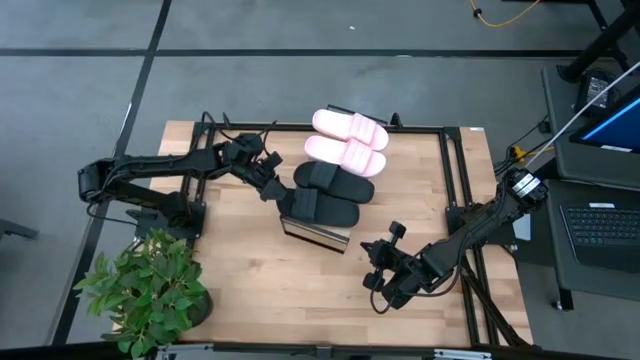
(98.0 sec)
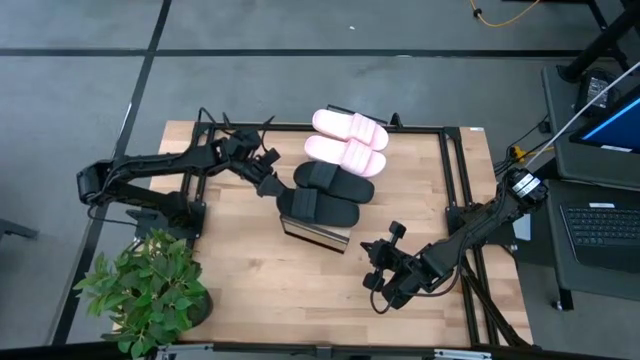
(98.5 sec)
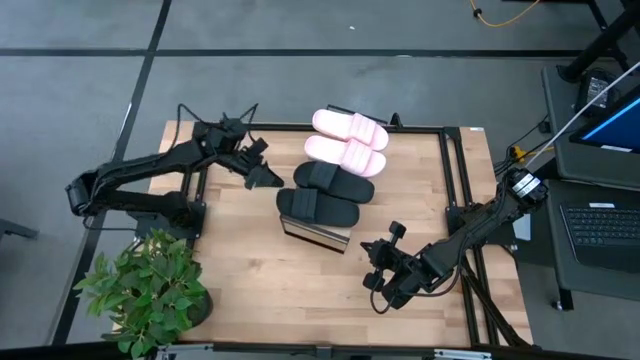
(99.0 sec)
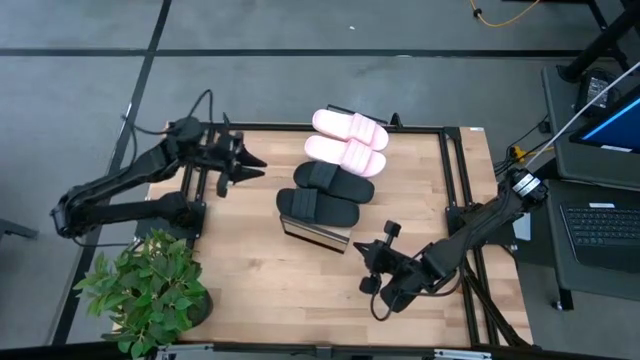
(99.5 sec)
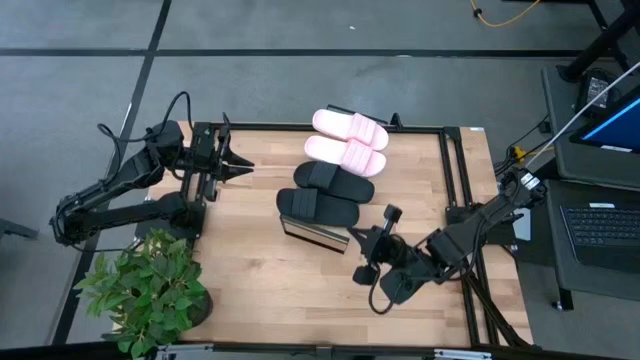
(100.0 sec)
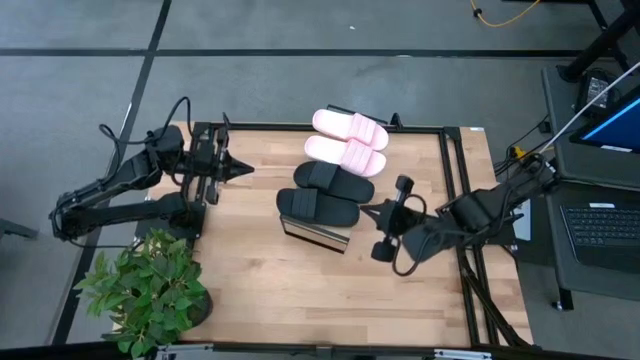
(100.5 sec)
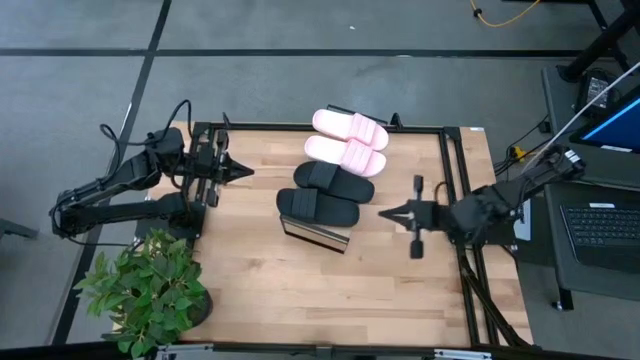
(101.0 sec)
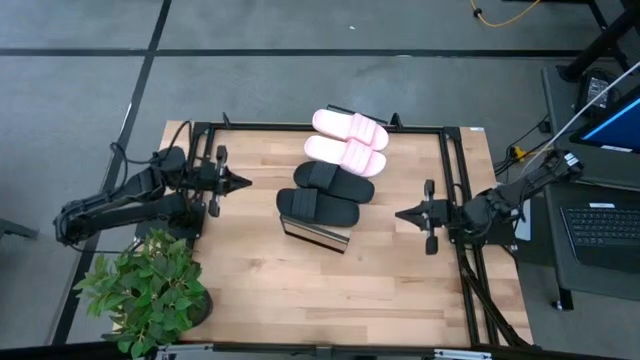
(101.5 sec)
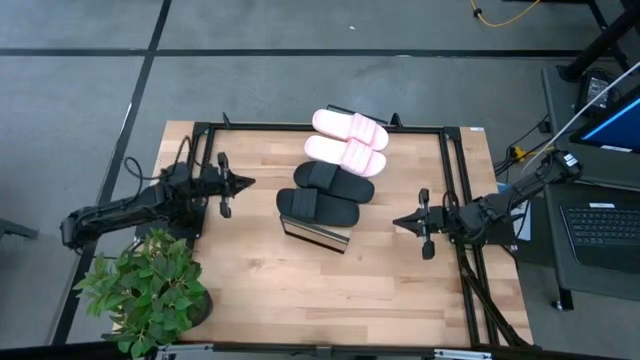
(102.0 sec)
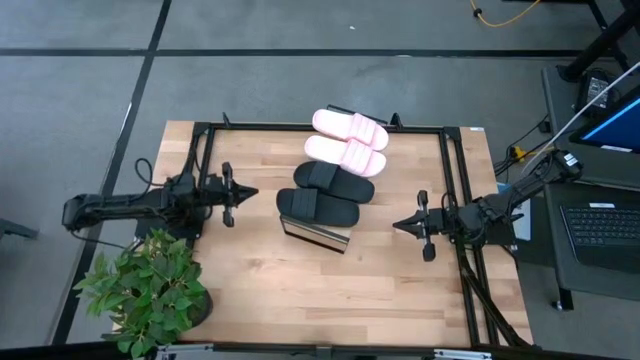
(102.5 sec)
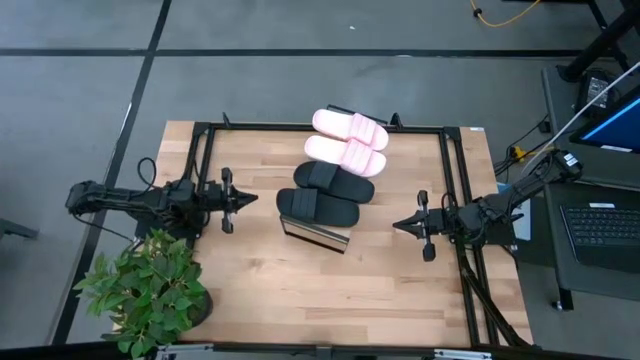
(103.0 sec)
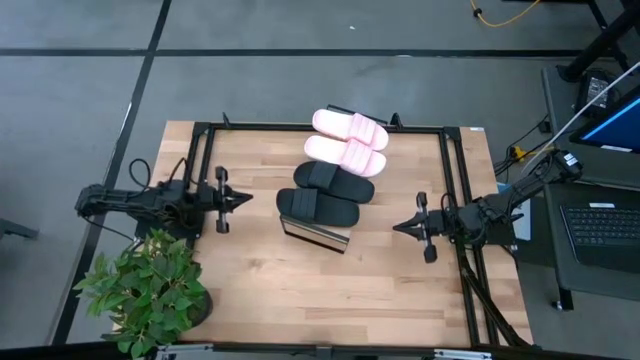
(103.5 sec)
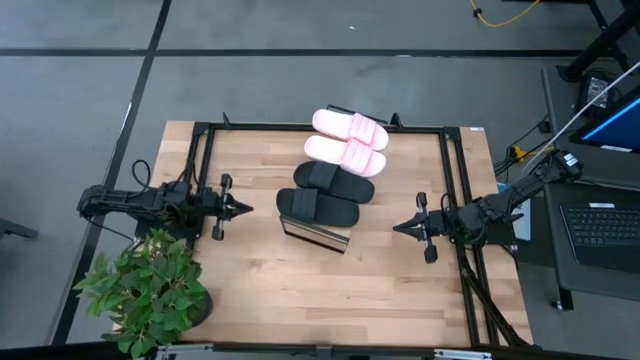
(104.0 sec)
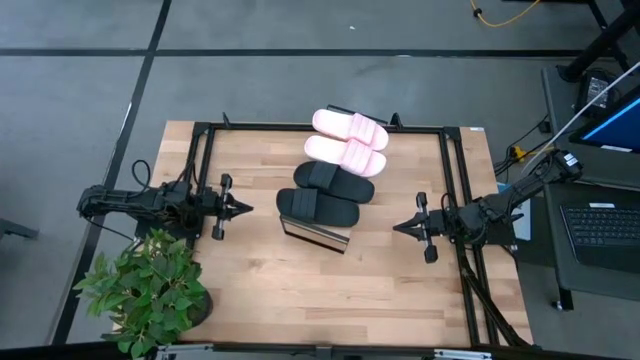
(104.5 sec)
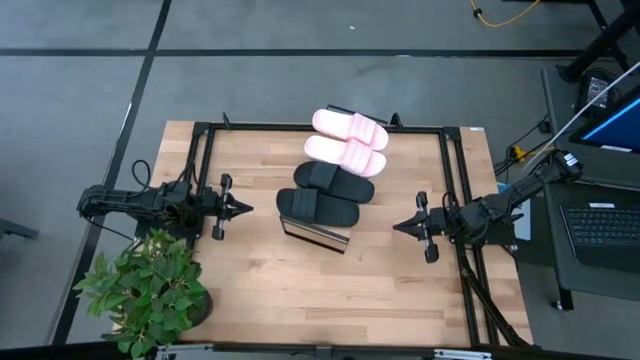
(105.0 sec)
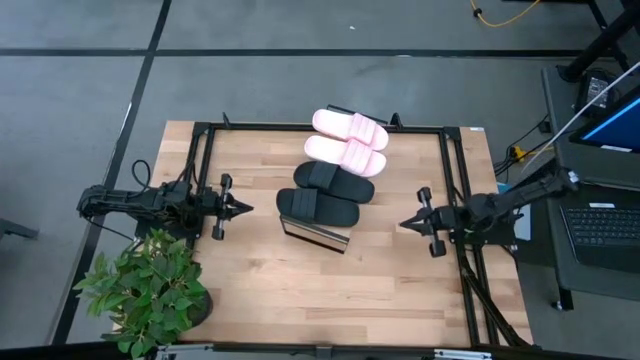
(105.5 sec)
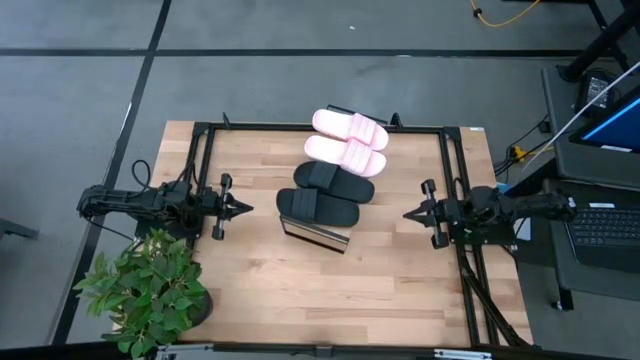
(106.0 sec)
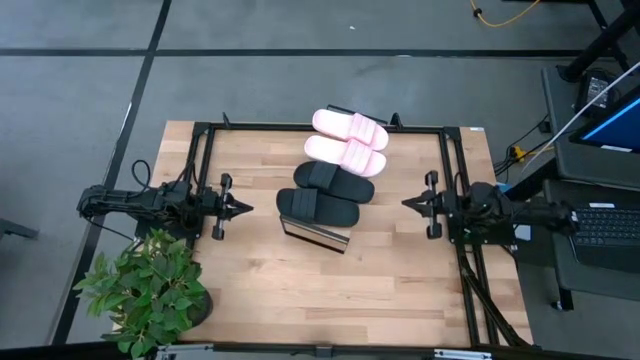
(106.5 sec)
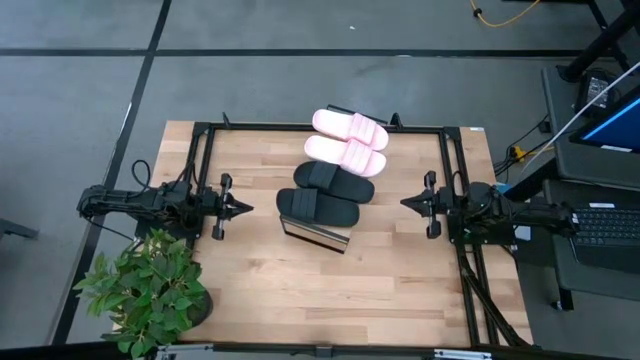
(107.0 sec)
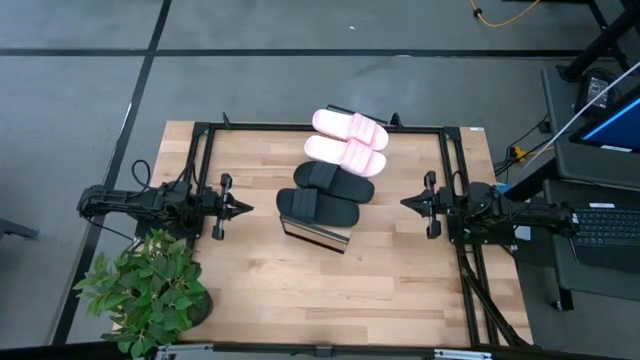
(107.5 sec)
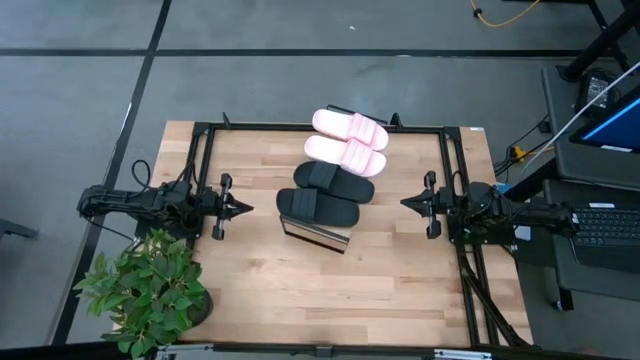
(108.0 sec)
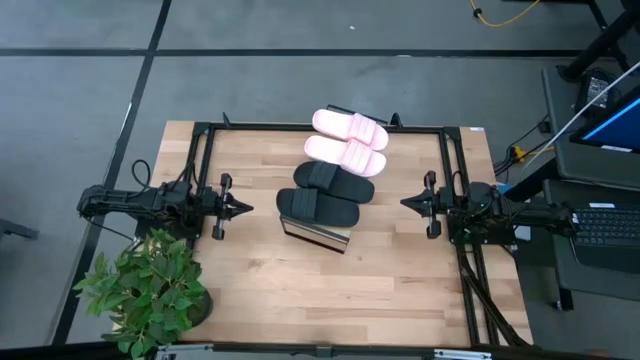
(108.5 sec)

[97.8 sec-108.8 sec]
Task: Pick and place slides into the shelf
Return to Home Position

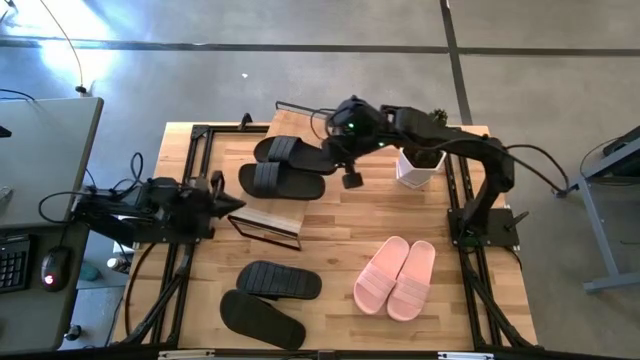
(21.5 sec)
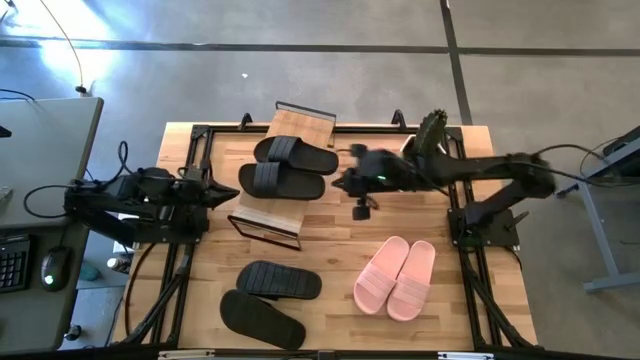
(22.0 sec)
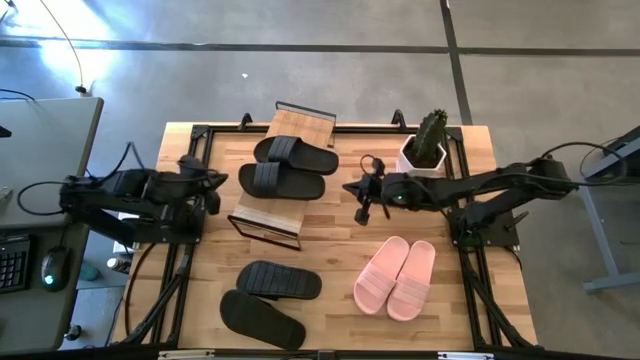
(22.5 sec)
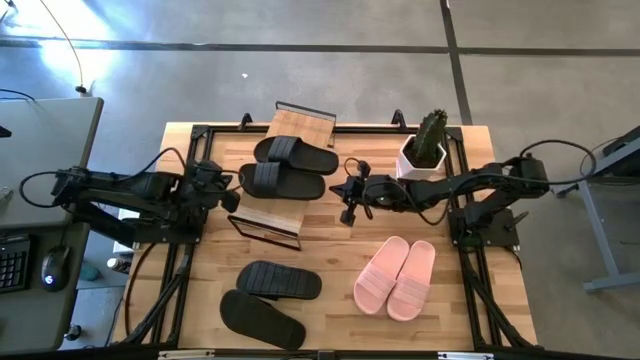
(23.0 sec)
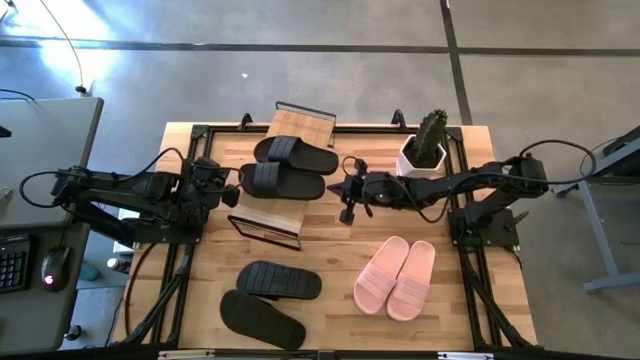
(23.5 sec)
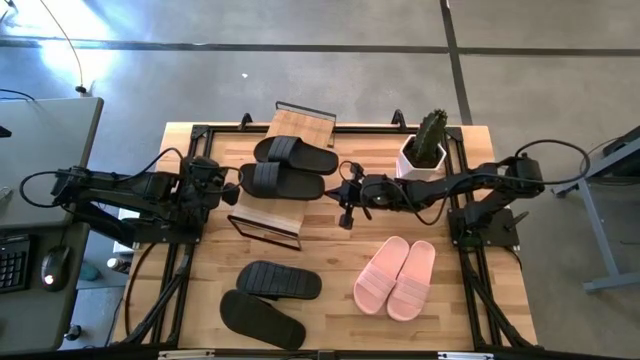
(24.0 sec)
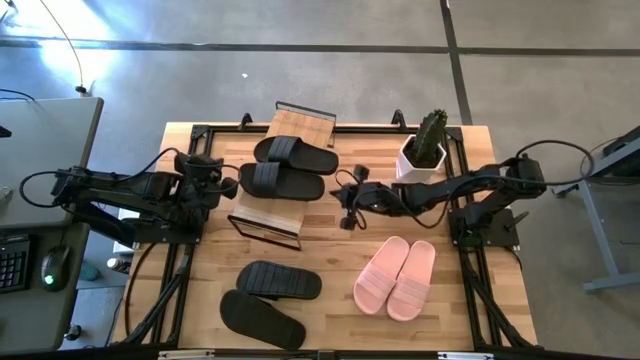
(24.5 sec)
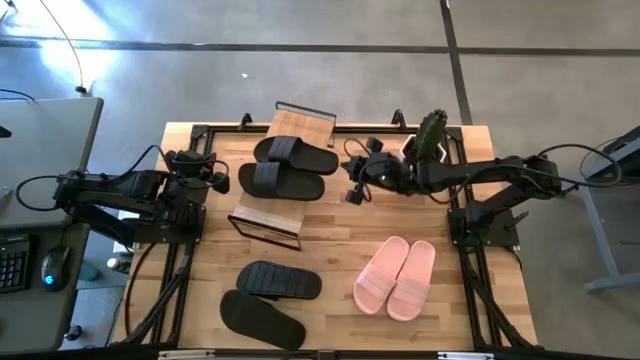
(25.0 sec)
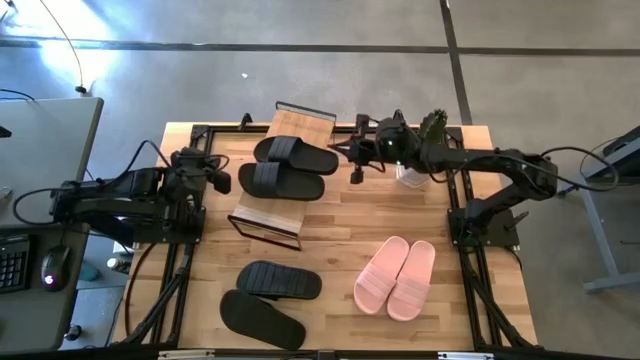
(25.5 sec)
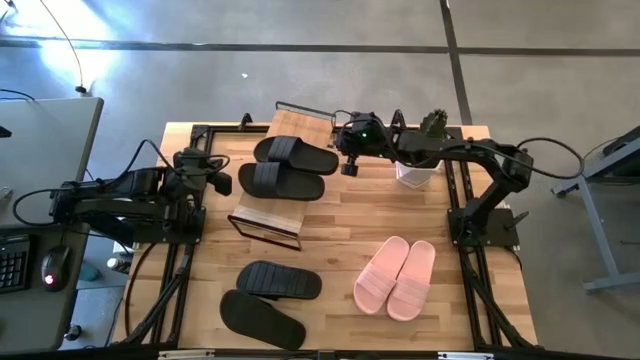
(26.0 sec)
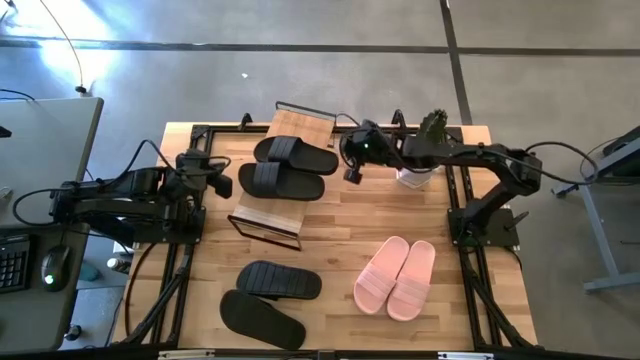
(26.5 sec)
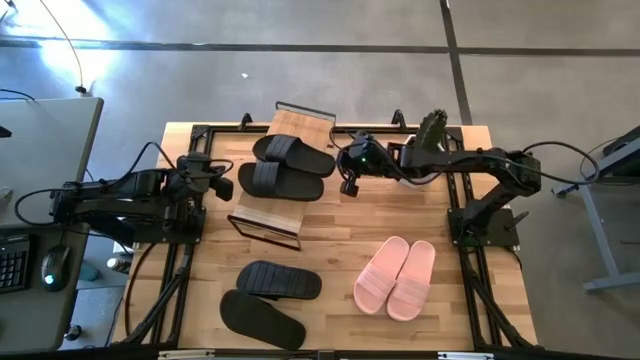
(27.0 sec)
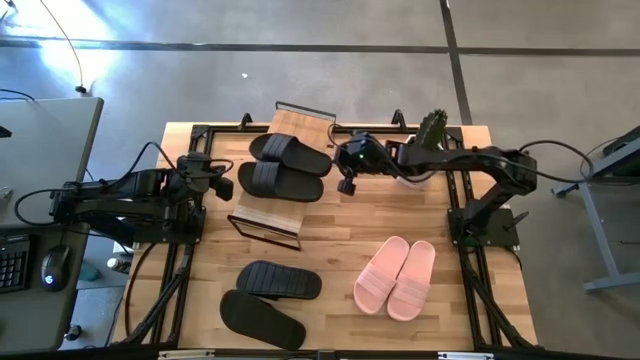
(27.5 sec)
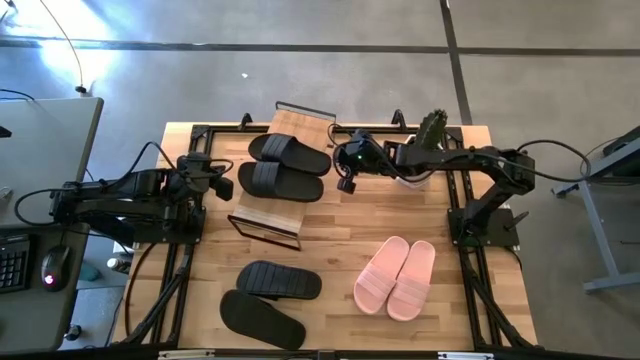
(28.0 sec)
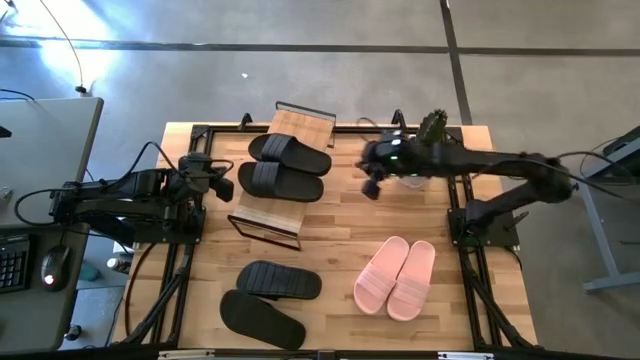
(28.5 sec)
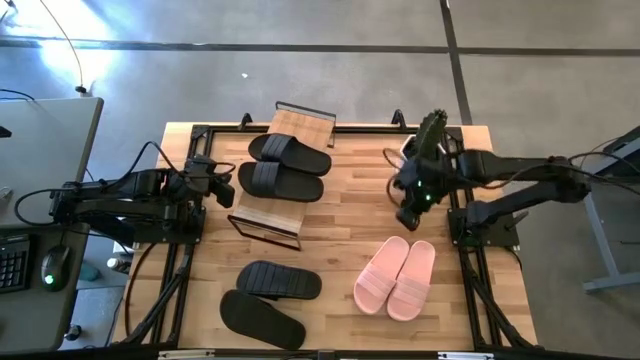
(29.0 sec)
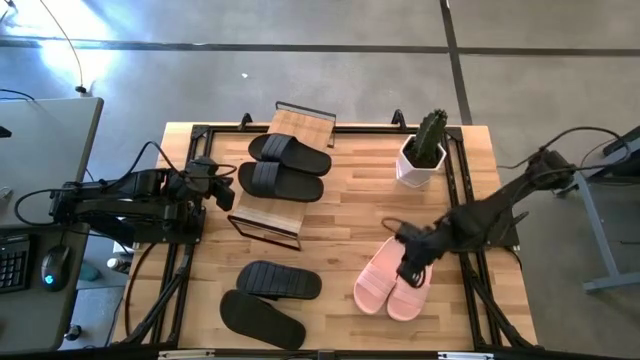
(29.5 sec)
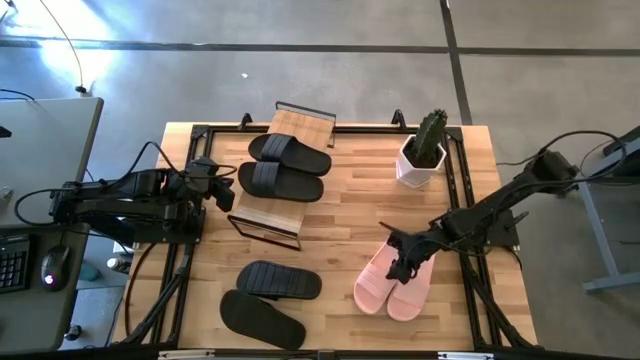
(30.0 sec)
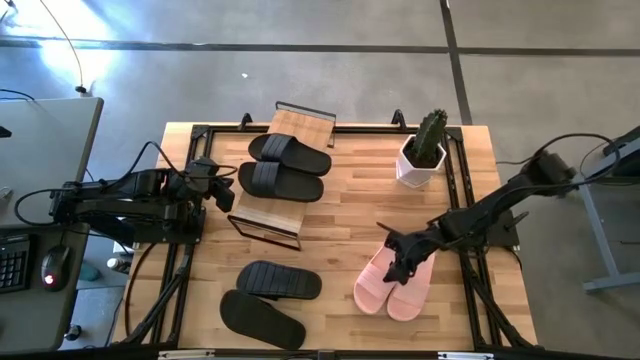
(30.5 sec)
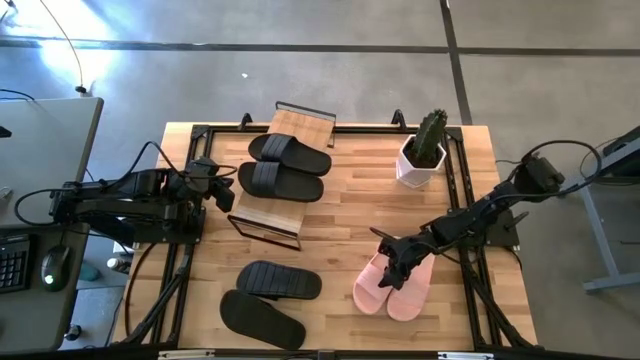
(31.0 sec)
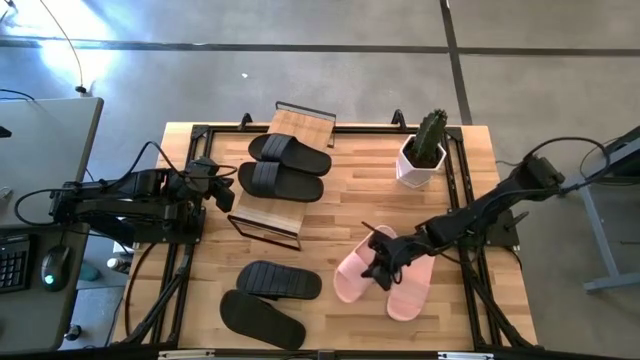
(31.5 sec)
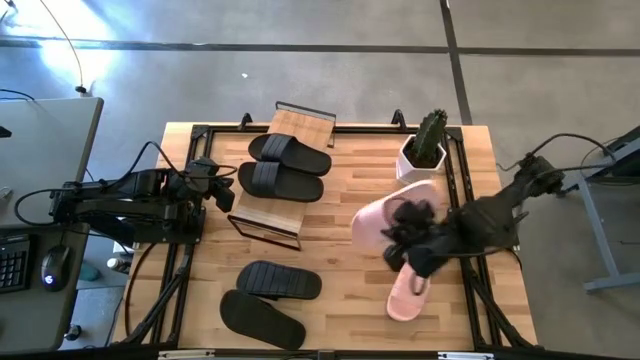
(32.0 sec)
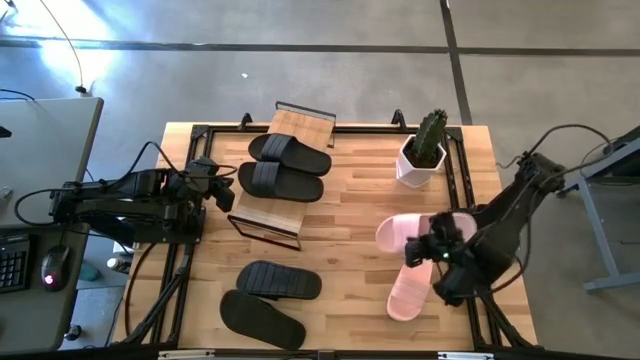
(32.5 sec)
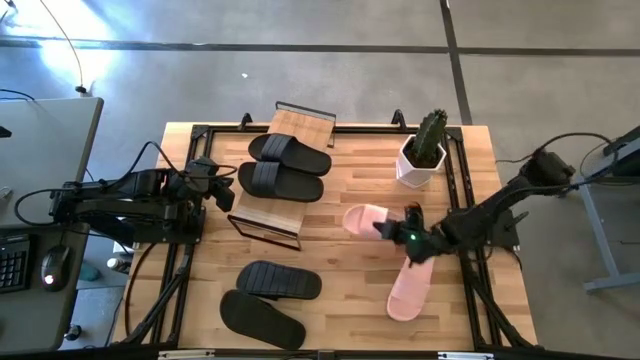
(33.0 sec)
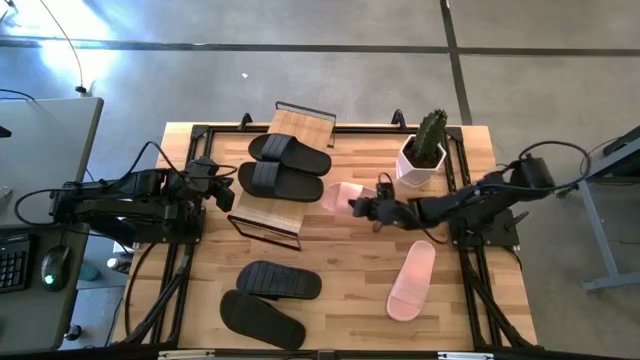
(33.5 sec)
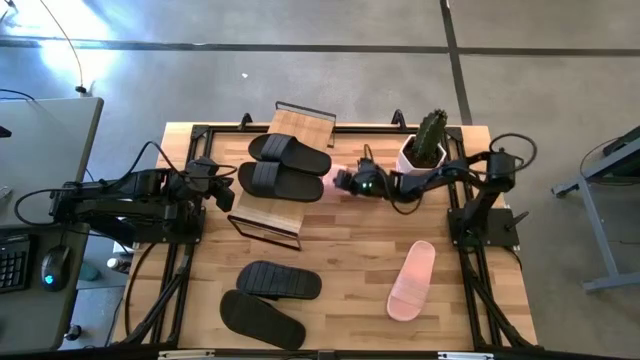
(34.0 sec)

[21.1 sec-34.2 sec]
Task: Pick and place slides into the shelf
Put the pink slides under the shelf
